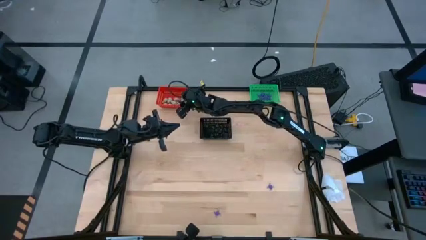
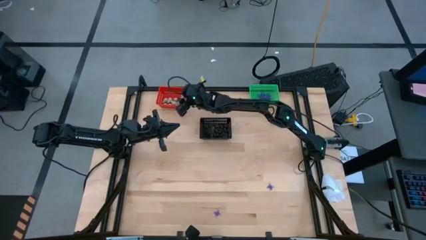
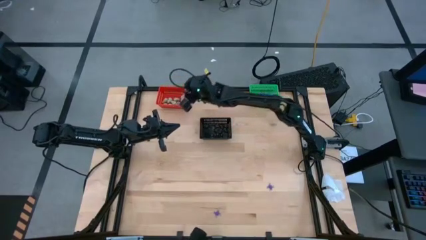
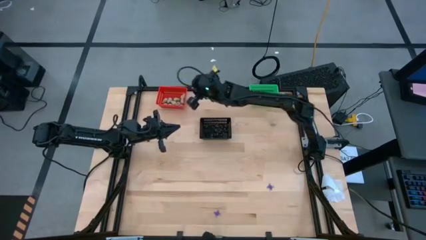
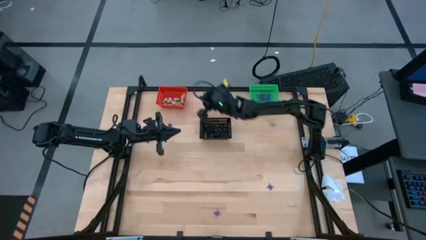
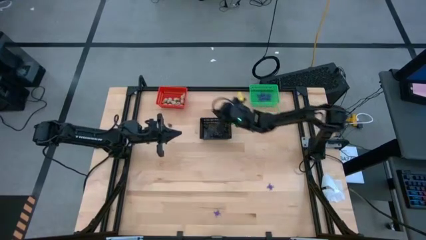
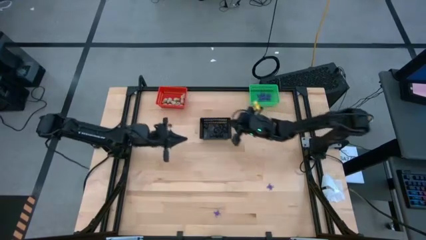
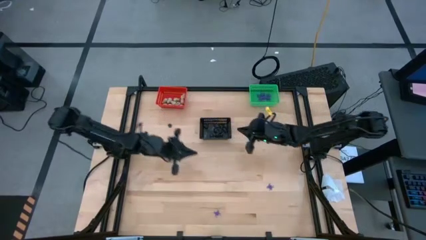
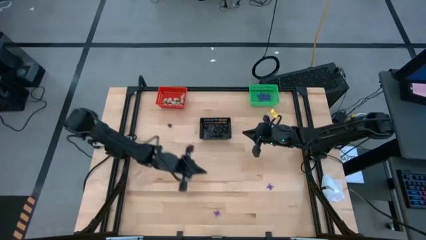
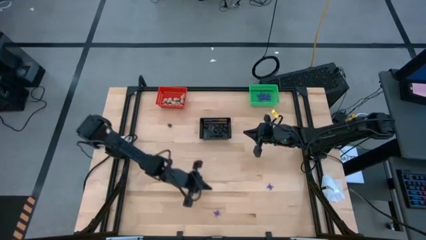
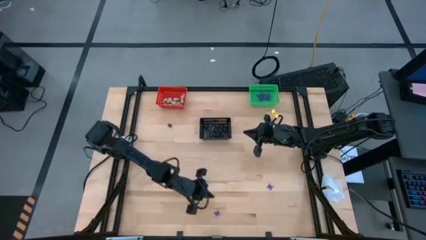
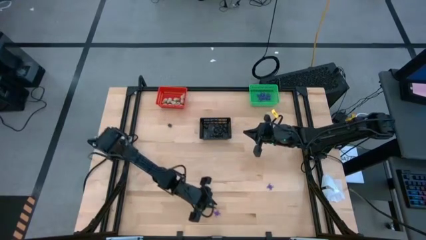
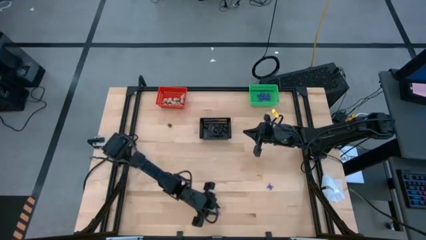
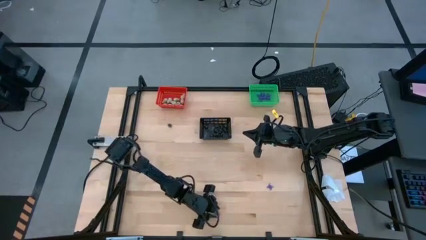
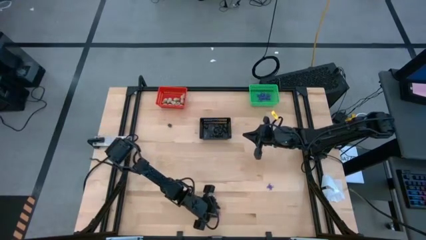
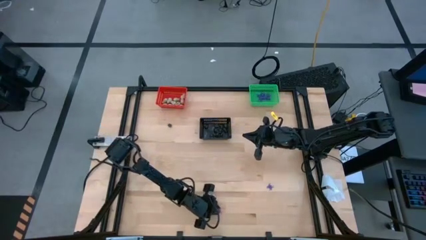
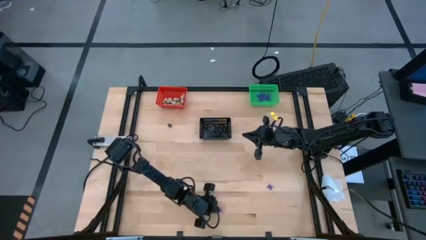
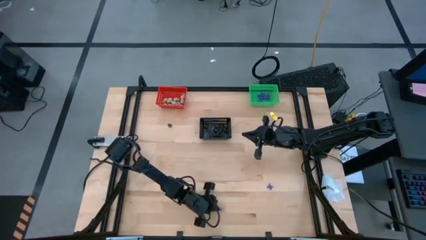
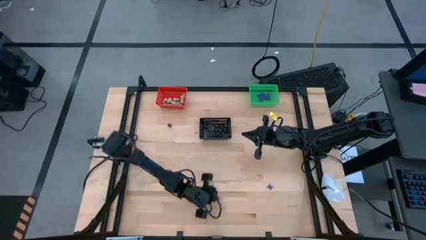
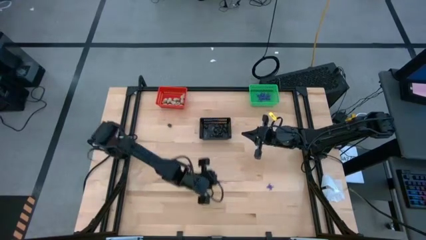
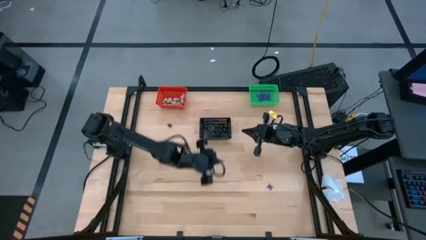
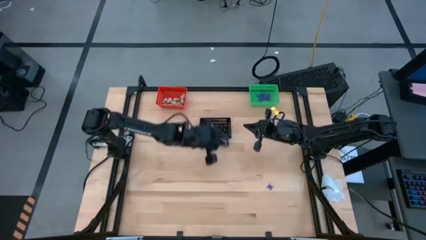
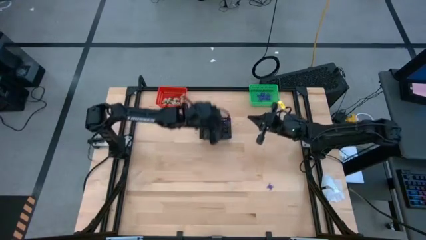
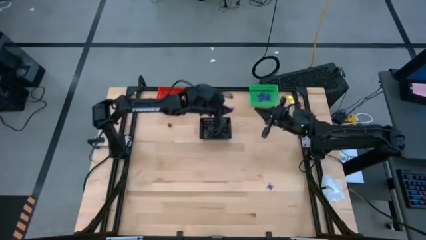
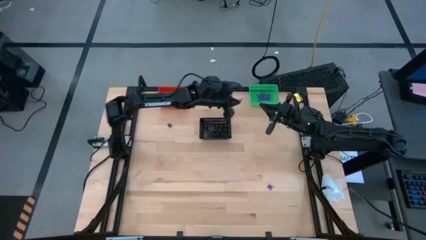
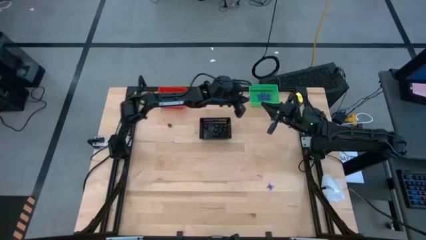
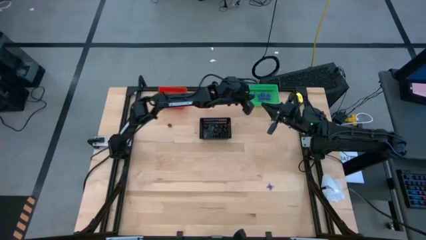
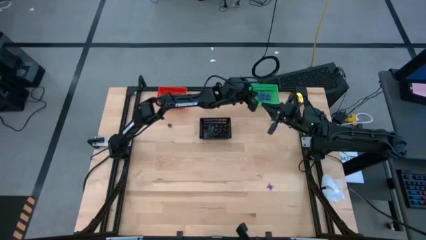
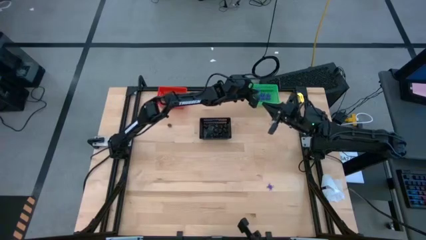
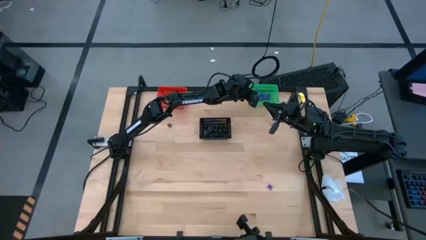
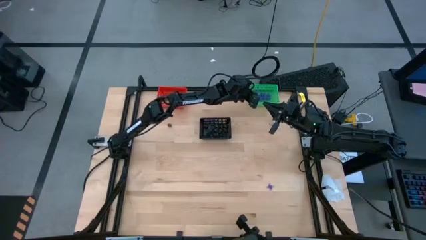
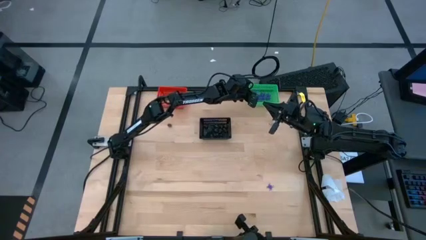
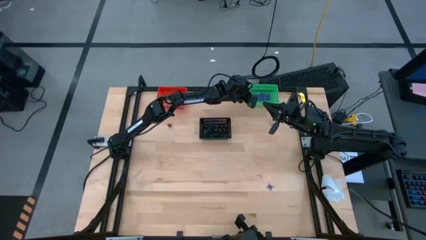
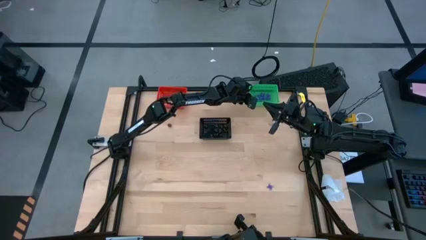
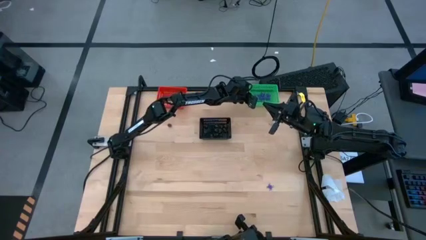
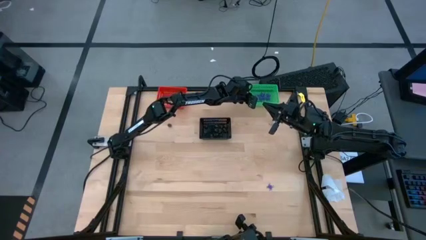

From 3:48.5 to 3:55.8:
Task: Sort Halloween decoration
Put the violet spider toy into the green bin

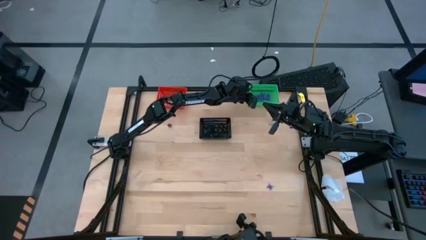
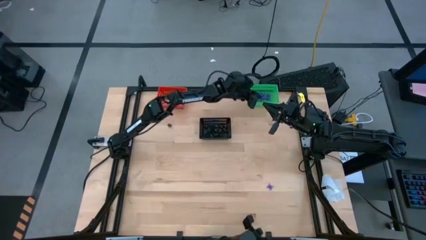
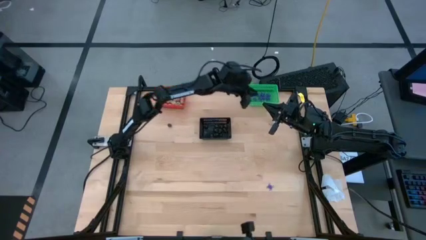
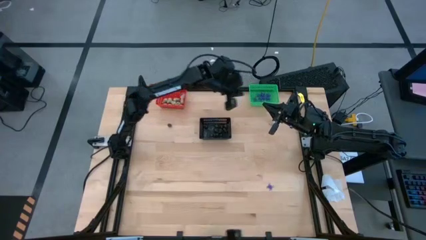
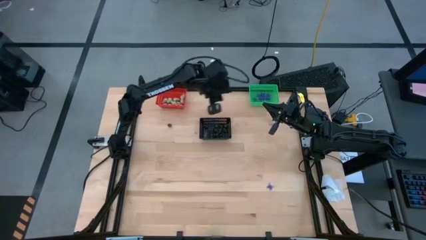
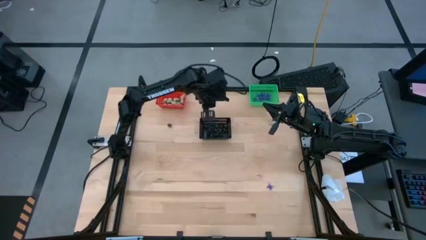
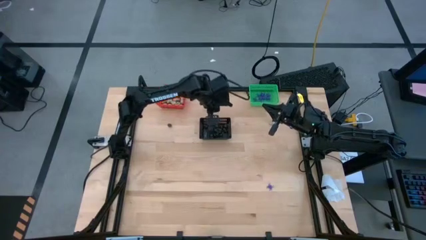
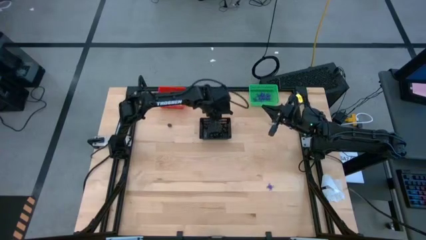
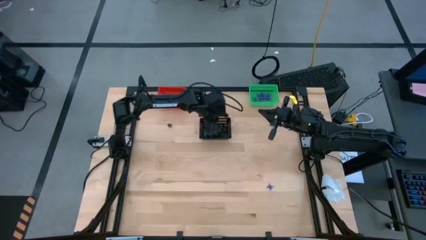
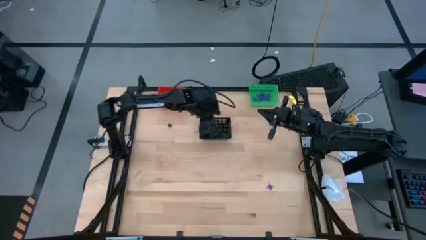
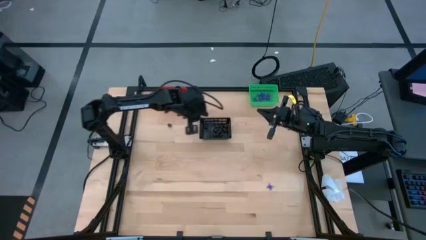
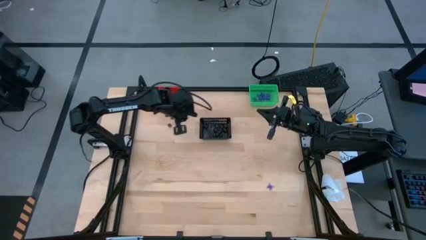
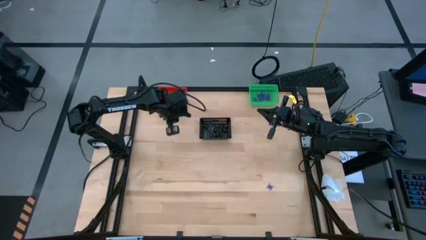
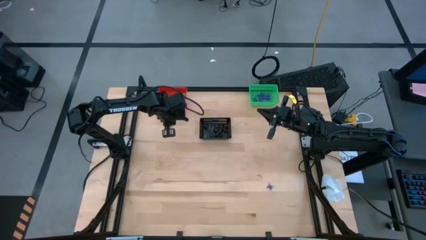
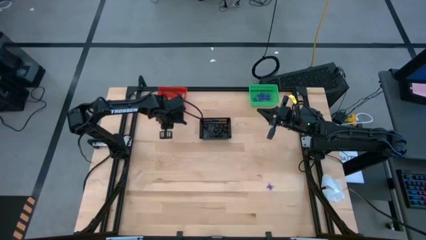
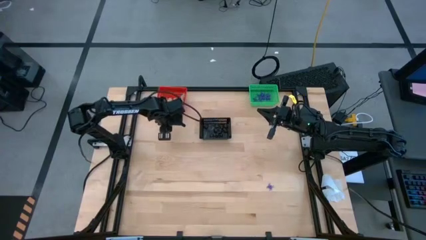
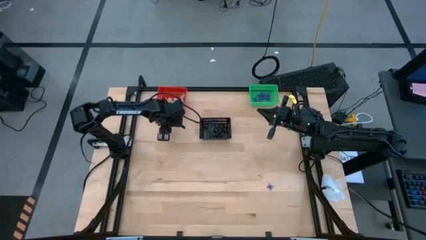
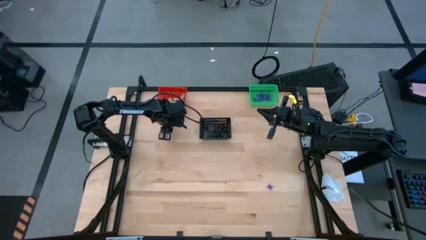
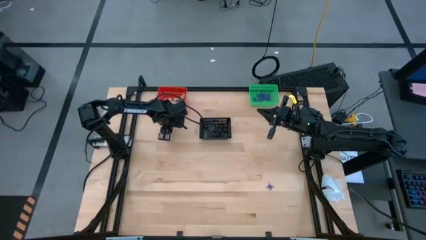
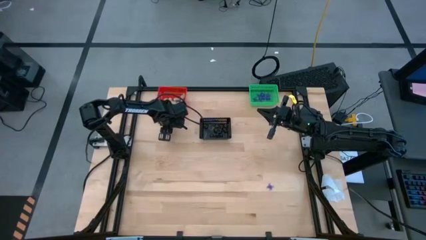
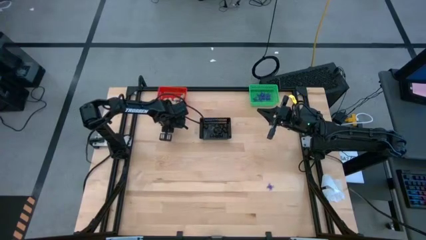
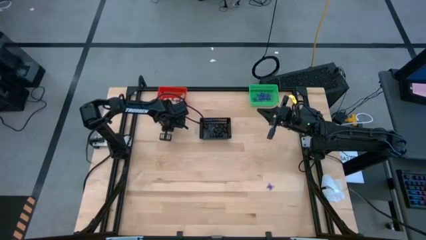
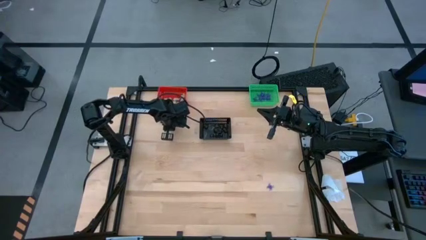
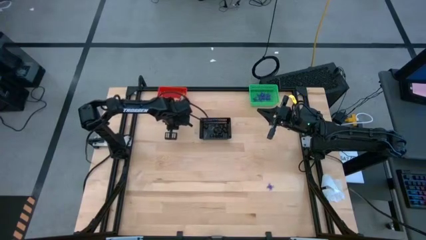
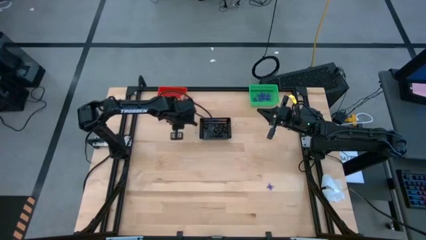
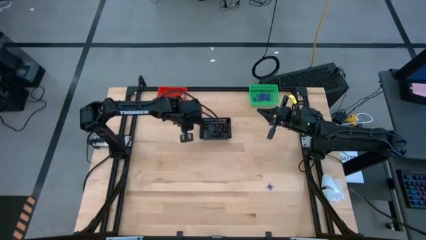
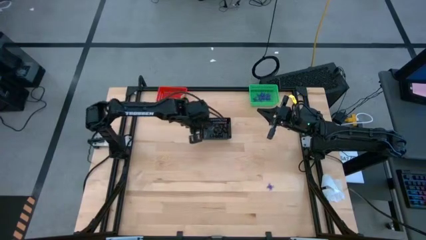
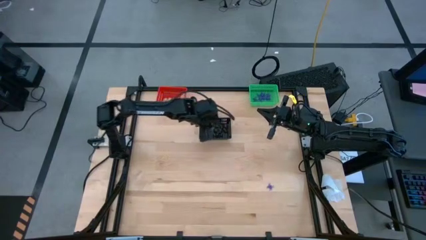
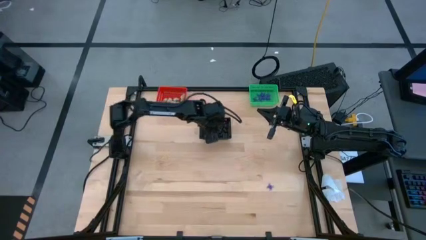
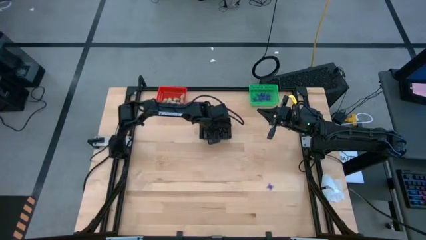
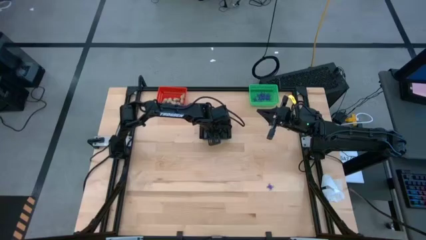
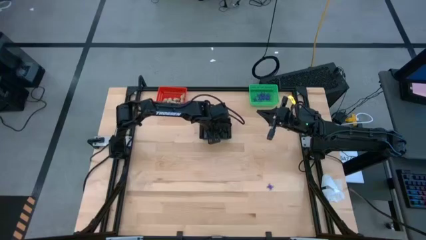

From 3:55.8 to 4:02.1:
Put the black skull toy into the black bin

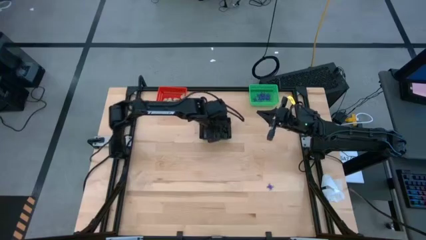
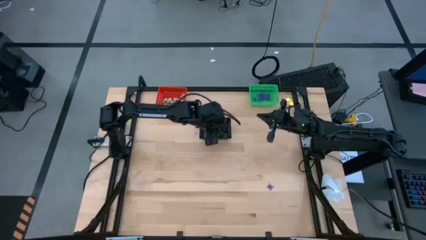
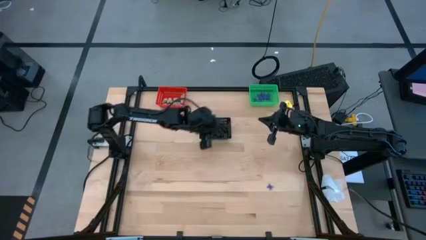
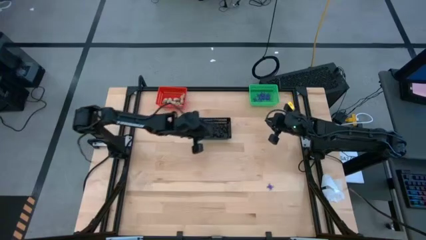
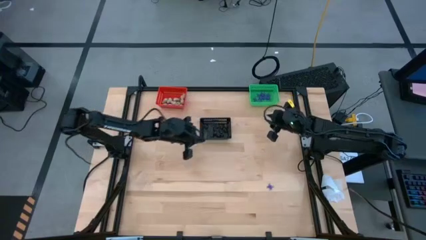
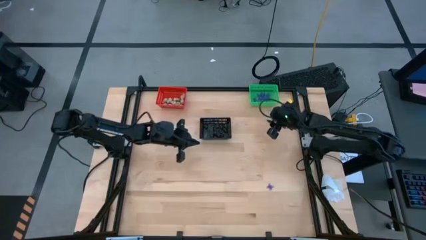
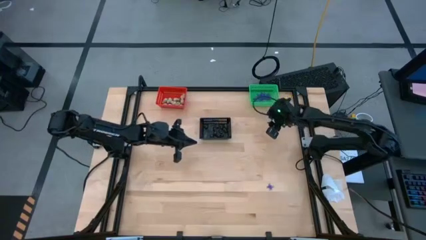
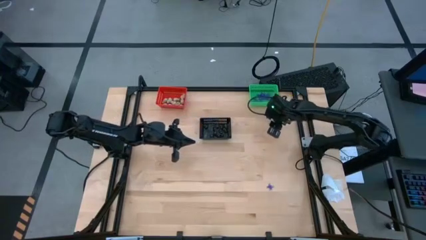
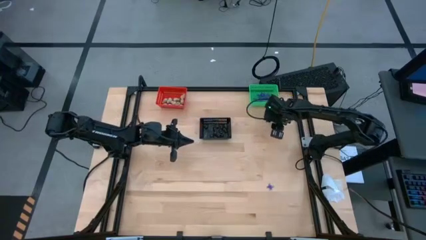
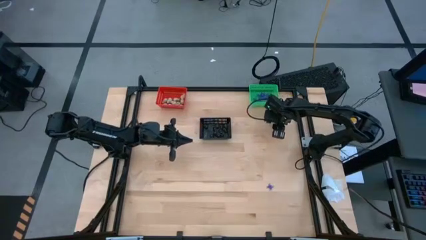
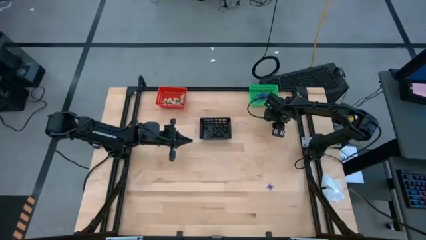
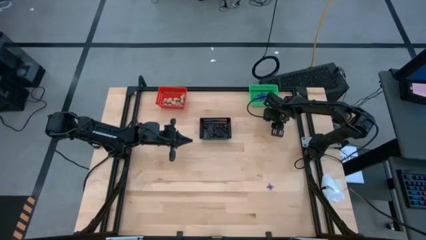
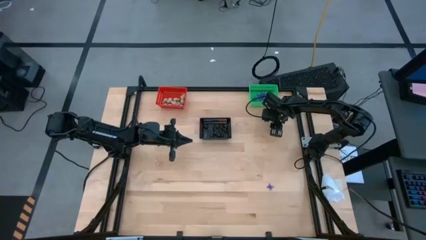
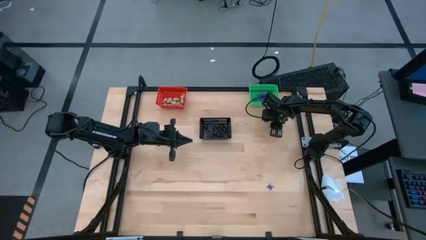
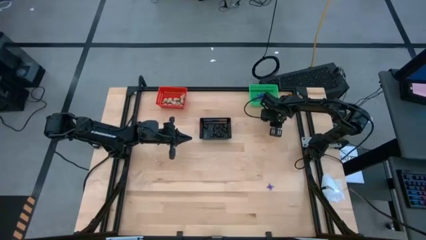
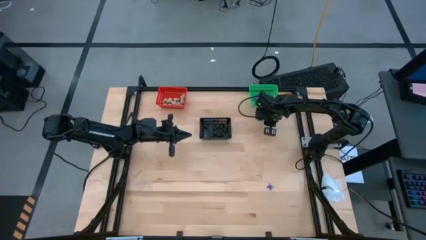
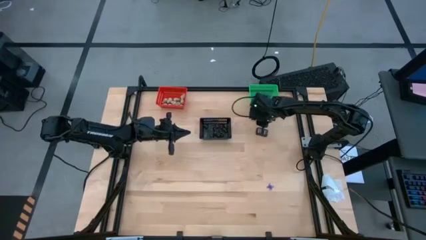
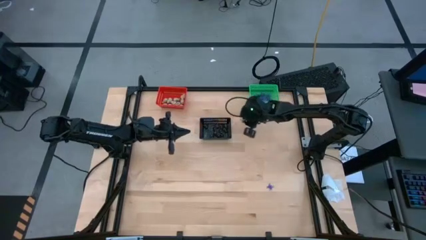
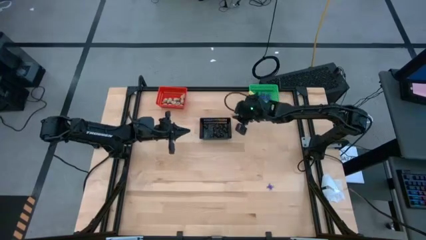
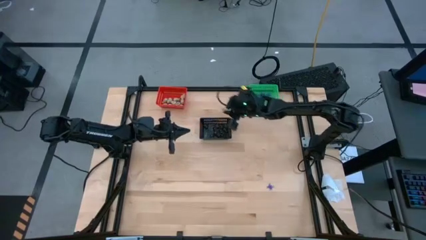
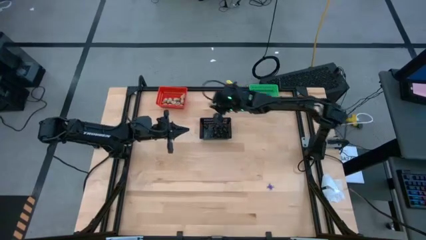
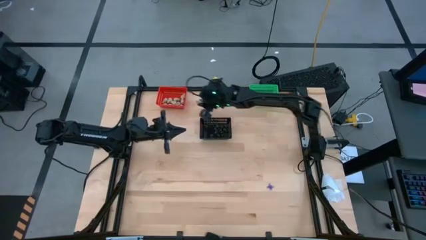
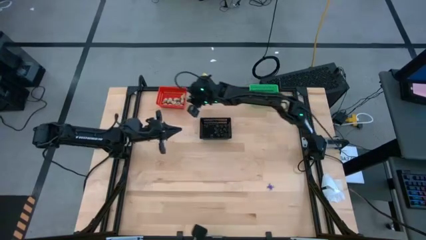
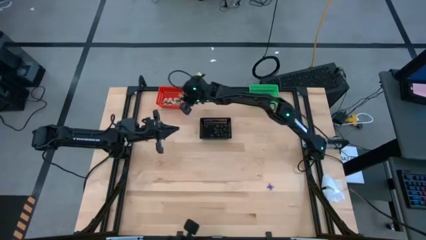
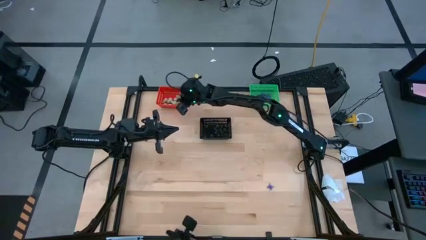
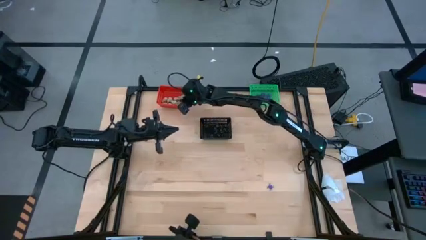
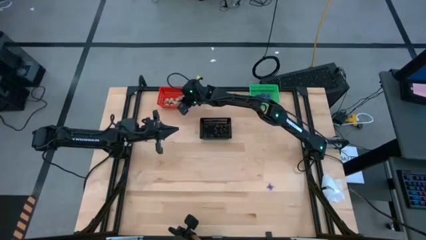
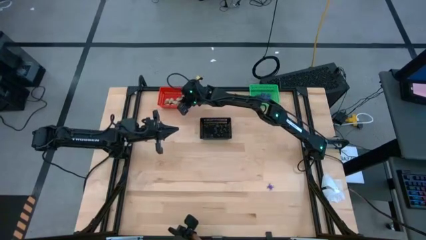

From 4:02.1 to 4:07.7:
Put the white skull toy into the orange bin
